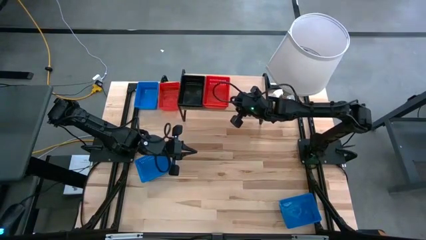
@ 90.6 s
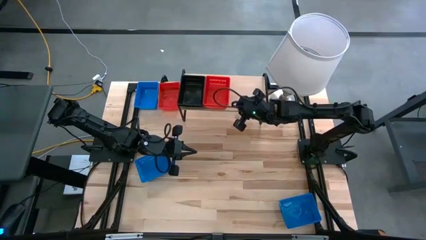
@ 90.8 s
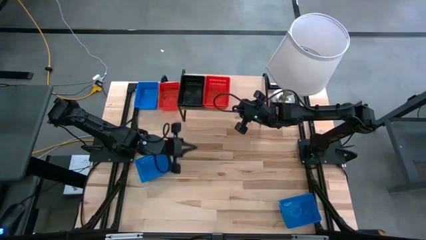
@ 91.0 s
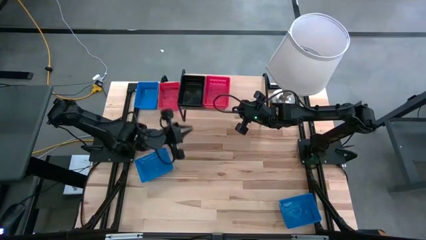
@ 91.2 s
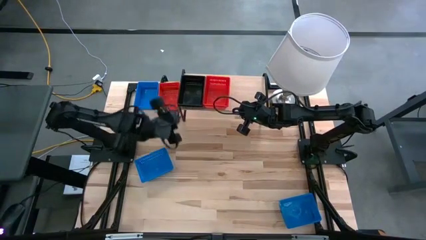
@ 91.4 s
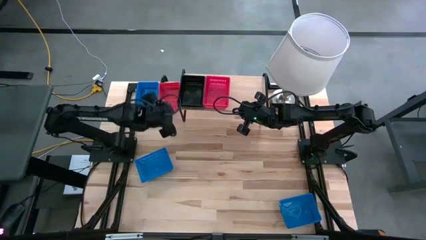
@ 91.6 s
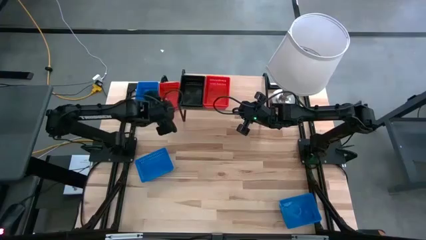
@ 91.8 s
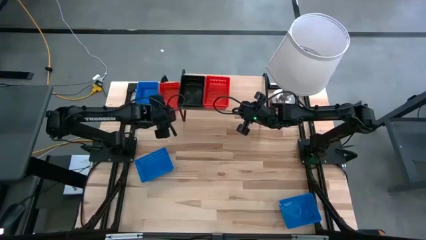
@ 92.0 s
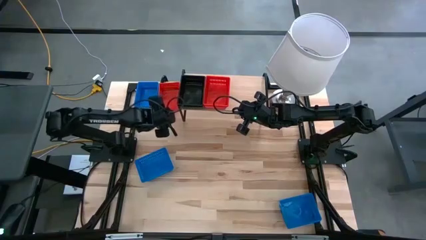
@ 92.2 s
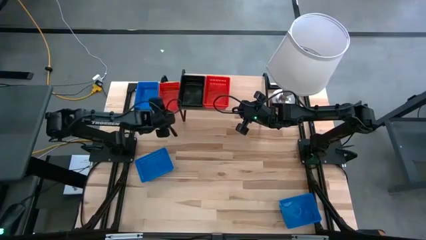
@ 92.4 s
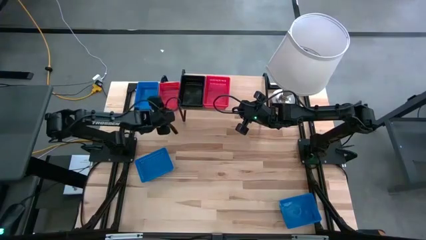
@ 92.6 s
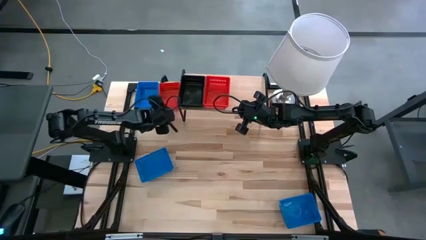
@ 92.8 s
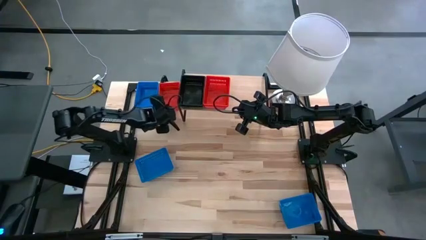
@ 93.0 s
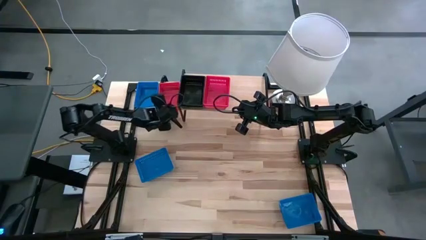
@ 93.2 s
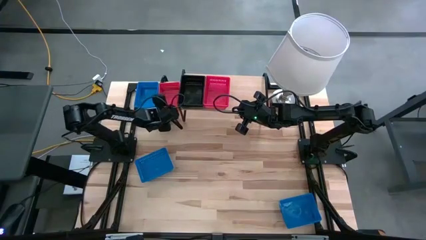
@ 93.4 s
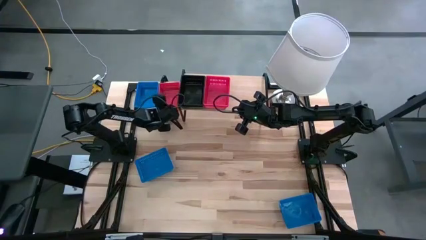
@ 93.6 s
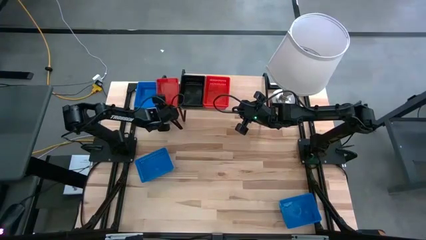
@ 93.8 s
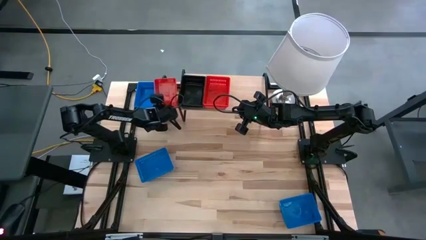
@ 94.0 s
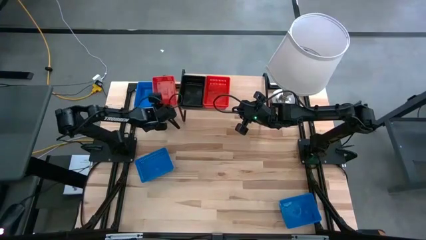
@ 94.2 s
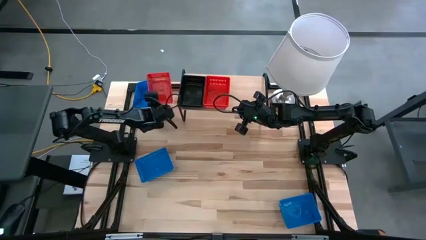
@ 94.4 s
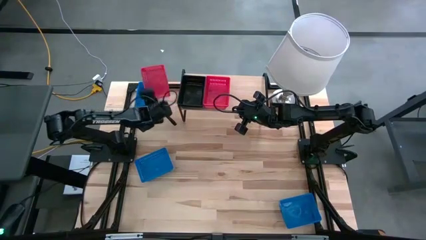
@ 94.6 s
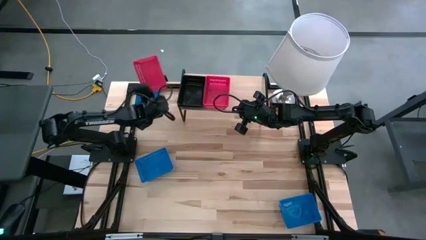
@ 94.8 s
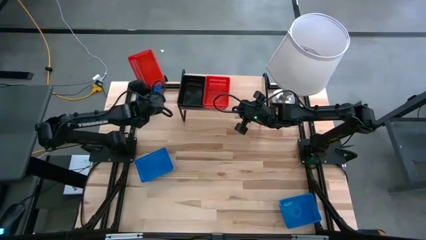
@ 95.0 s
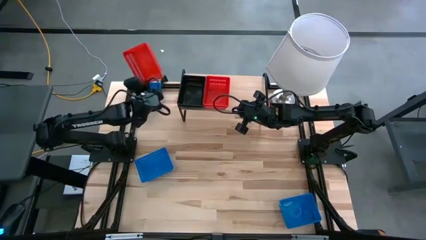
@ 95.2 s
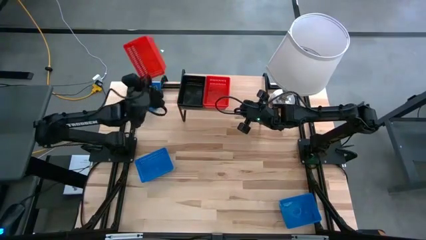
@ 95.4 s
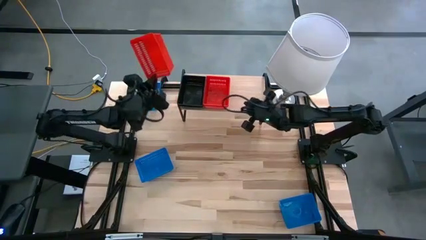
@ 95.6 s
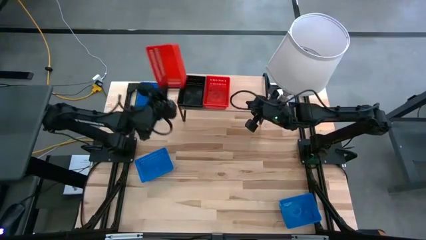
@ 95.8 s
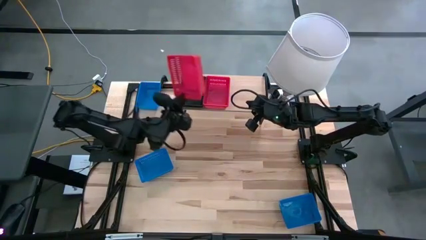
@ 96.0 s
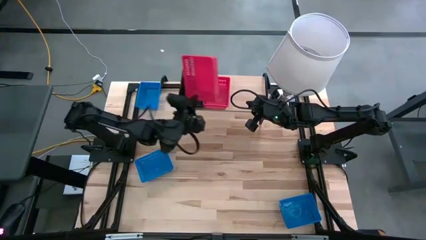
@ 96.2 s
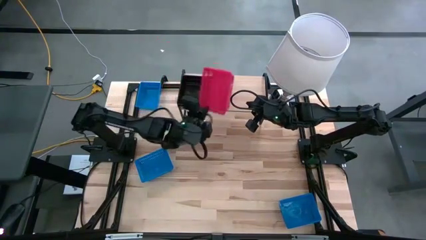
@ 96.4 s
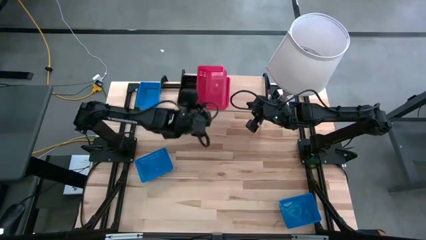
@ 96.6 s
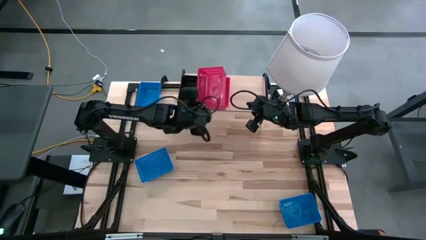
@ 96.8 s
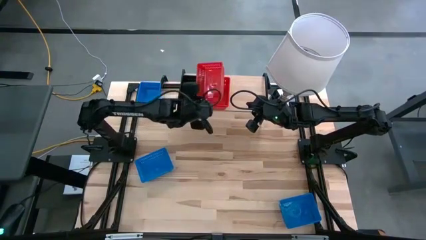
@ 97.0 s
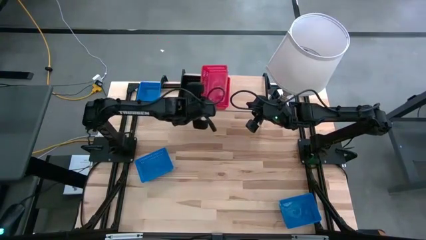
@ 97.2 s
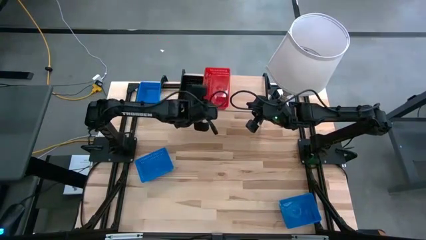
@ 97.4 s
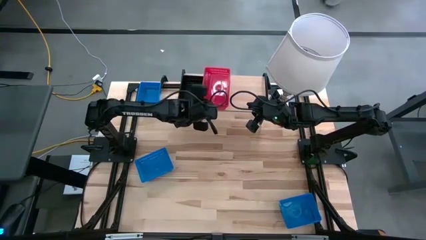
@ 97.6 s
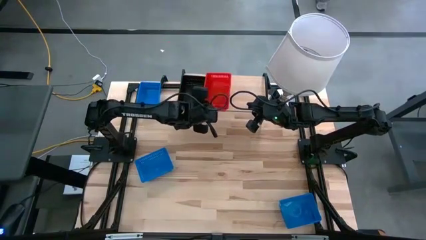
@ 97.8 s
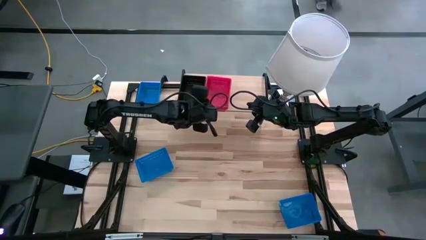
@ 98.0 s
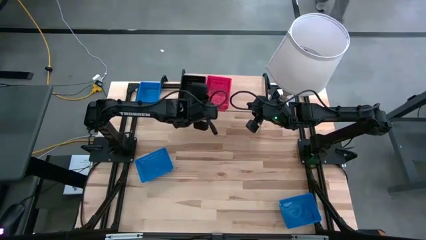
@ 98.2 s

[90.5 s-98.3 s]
Task: Stack baskets on shelf by color
Stack the red bin on top of the red bins on the shelf

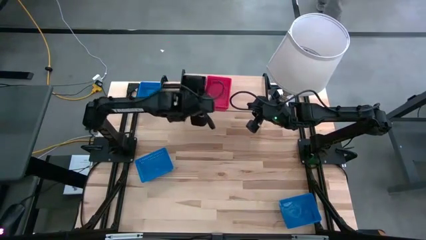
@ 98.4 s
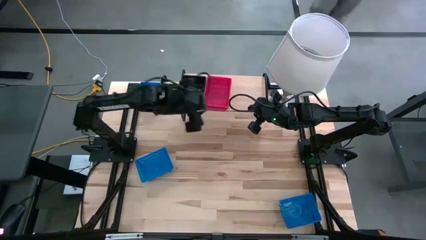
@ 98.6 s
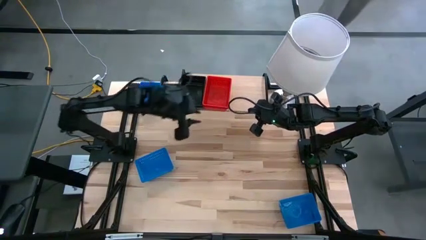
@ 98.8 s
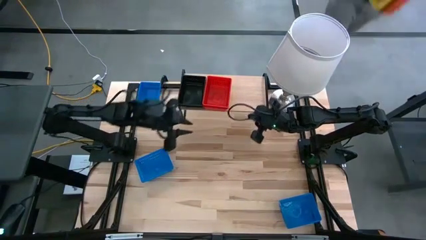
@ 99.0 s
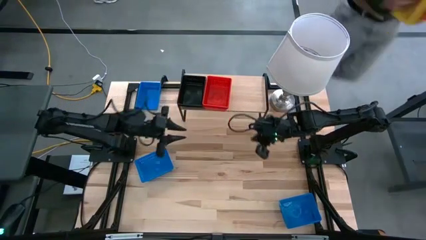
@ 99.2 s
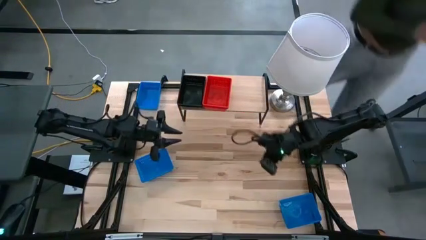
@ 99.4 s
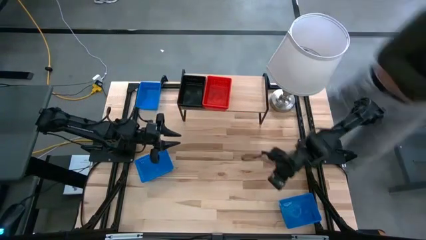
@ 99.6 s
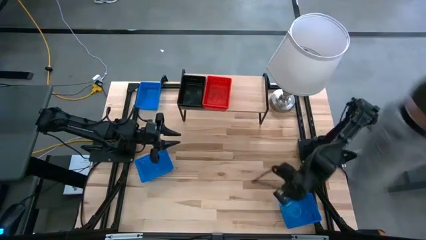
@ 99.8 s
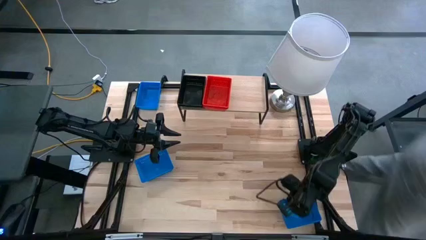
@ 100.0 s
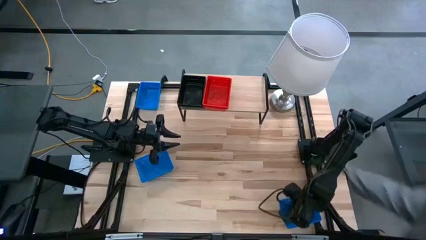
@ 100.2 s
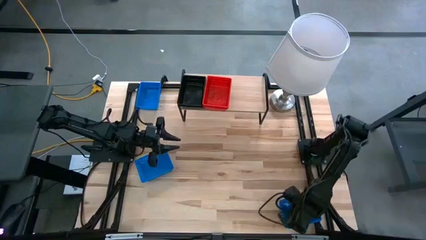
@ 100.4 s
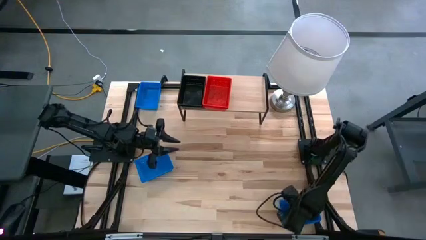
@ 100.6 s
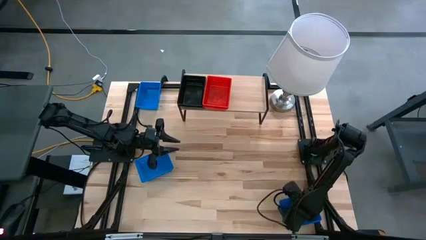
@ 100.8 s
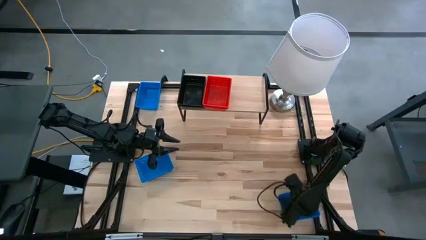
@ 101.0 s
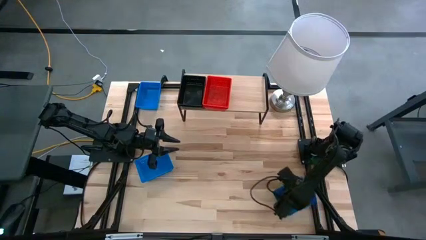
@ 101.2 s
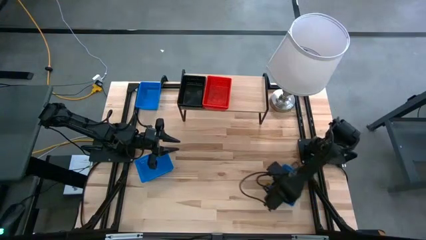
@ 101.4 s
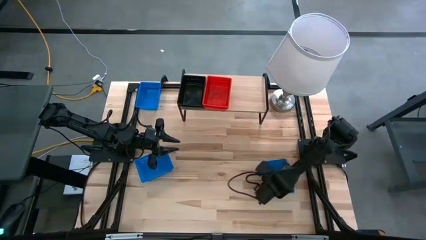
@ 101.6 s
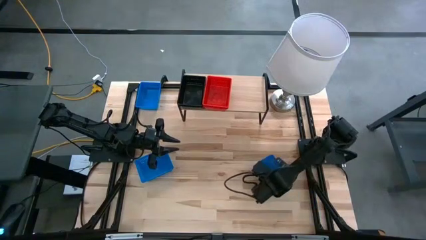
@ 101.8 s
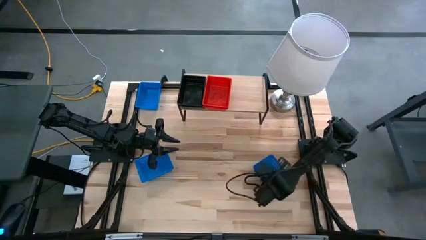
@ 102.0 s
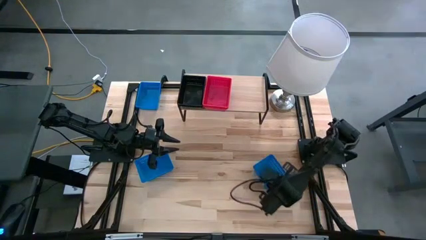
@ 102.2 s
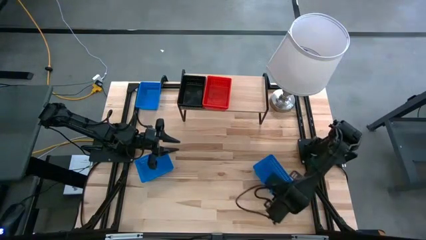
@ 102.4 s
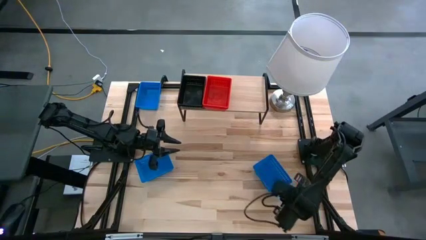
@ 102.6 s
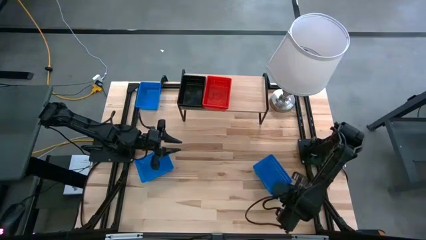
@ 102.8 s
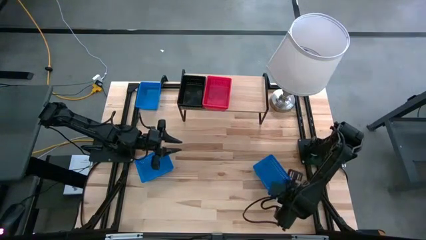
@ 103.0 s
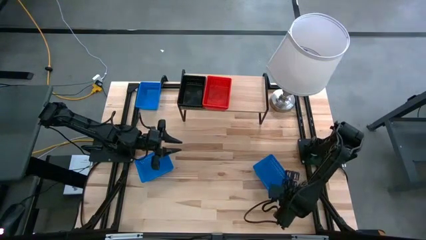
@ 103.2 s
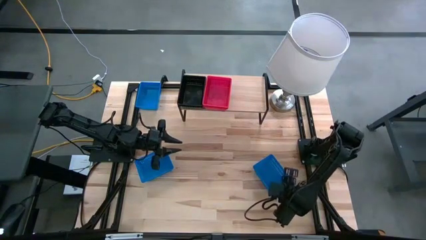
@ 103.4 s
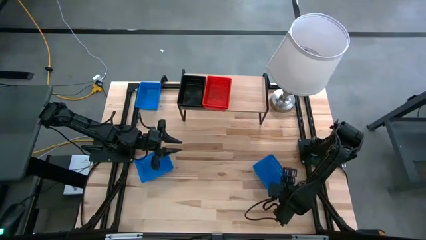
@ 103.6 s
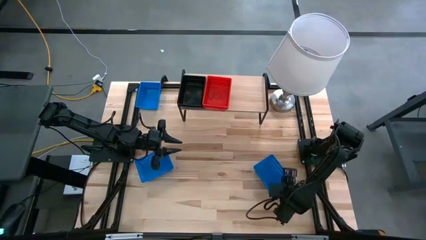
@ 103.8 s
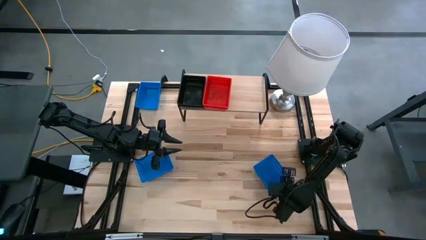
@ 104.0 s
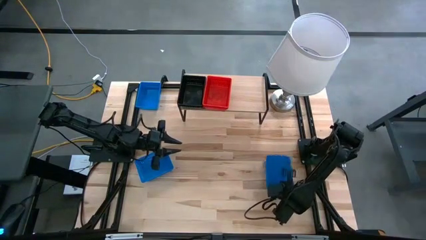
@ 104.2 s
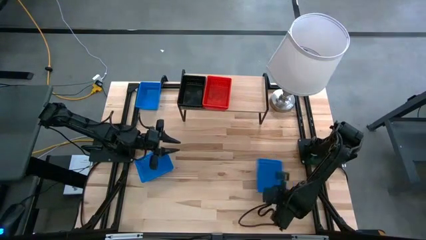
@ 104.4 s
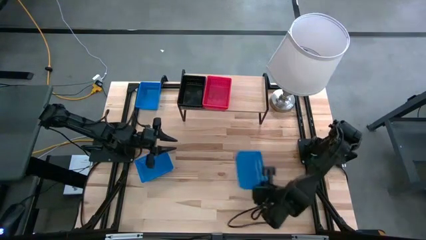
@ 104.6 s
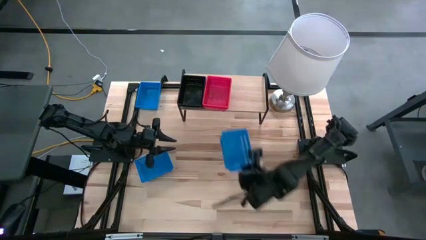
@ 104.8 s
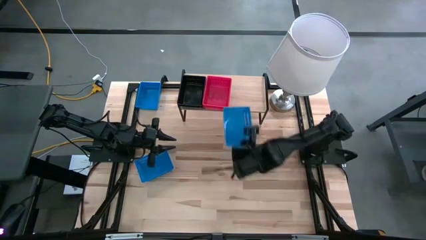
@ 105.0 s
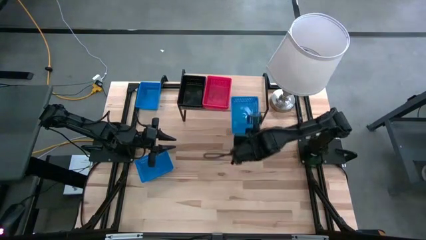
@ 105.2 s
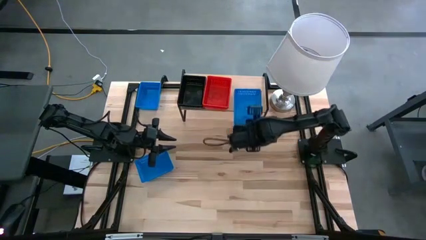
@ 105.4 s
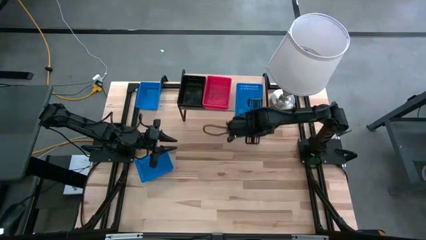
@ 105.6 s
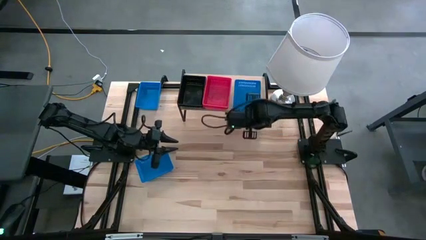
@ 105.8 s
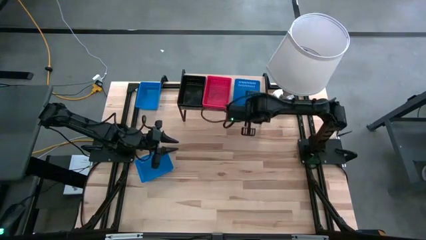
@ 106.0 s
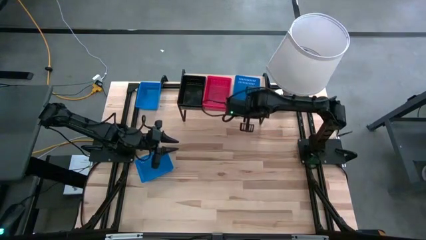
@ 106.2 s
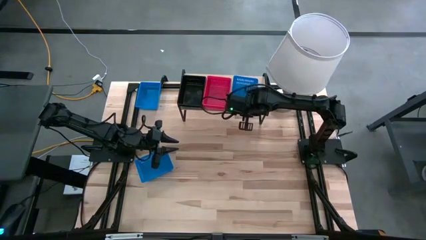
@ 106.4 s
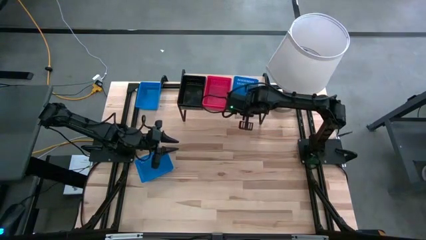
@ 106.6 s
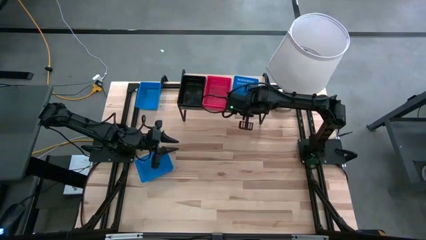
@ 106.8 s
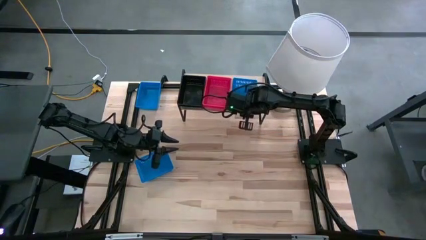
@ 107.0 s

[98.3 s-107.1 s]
Put the bottom right blue bin on the shelf
